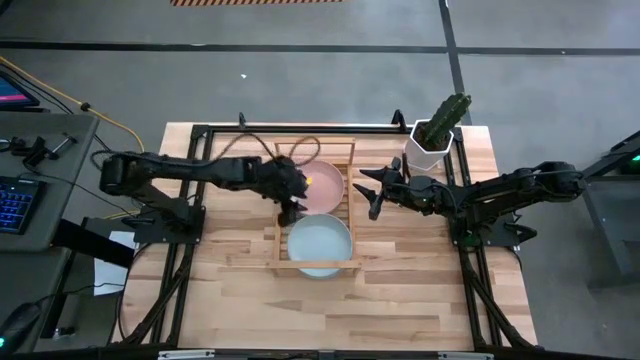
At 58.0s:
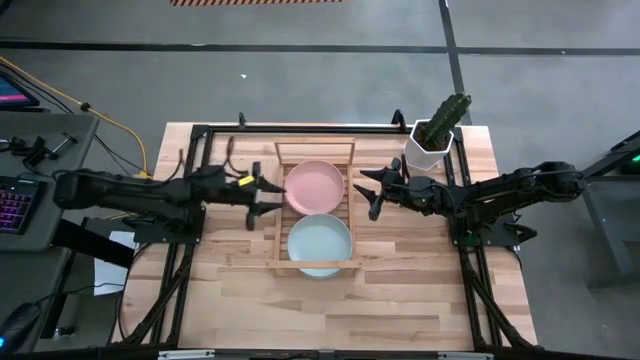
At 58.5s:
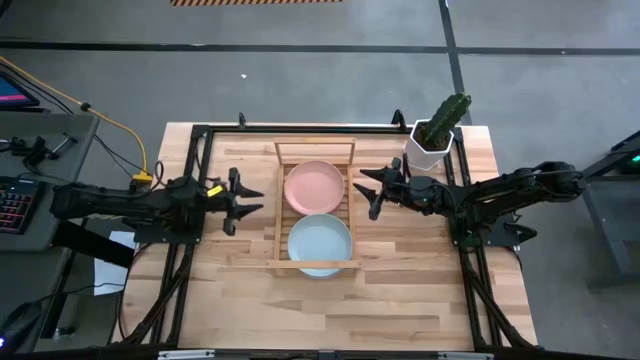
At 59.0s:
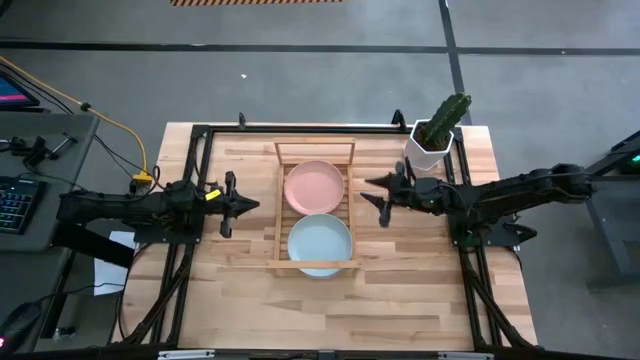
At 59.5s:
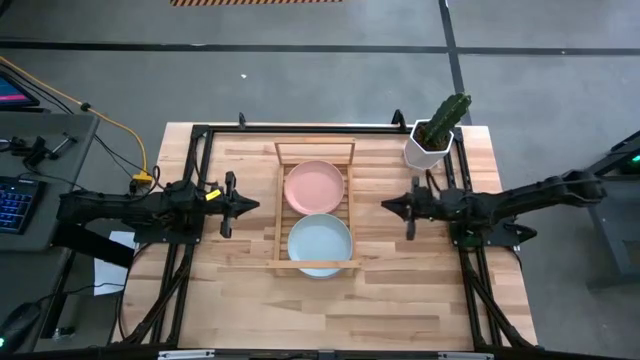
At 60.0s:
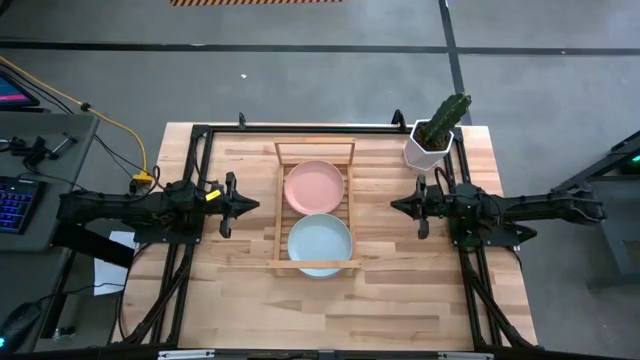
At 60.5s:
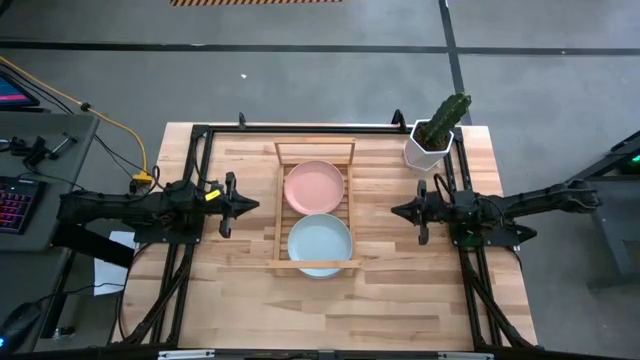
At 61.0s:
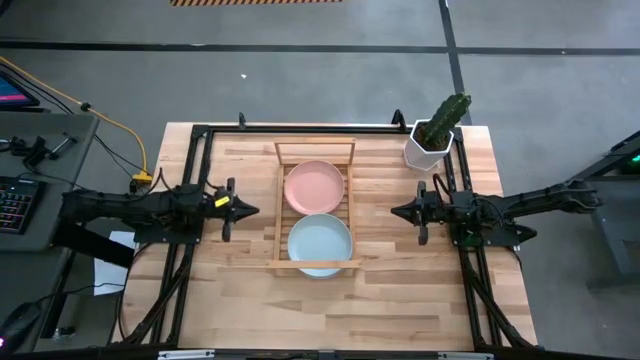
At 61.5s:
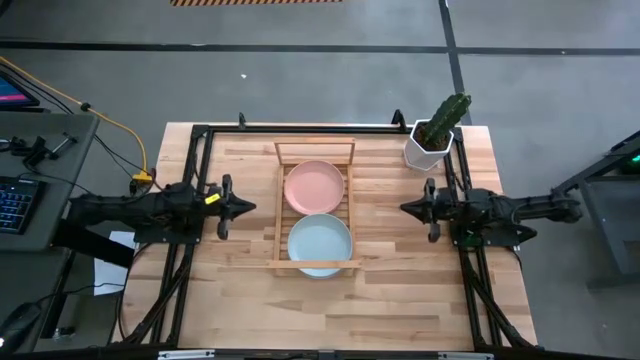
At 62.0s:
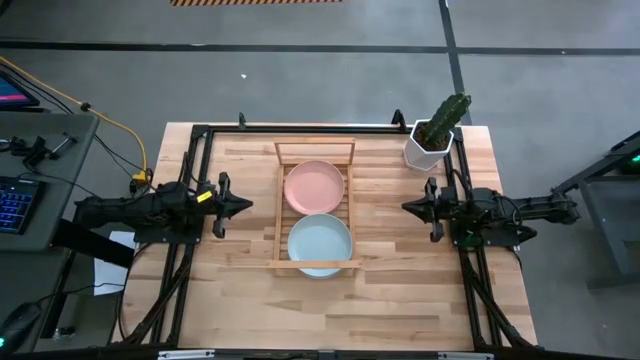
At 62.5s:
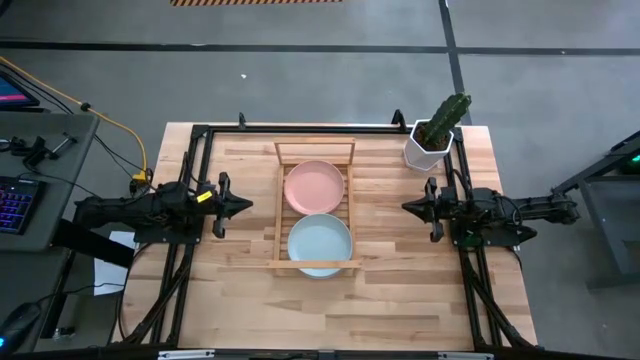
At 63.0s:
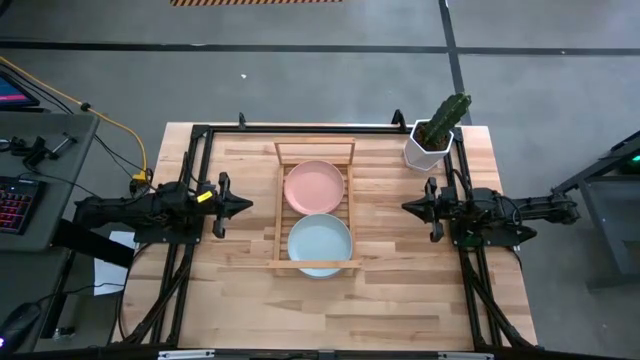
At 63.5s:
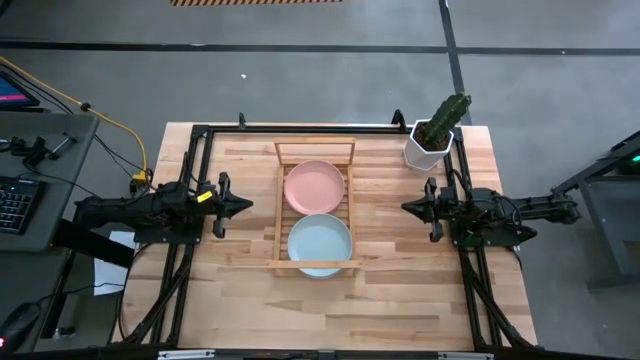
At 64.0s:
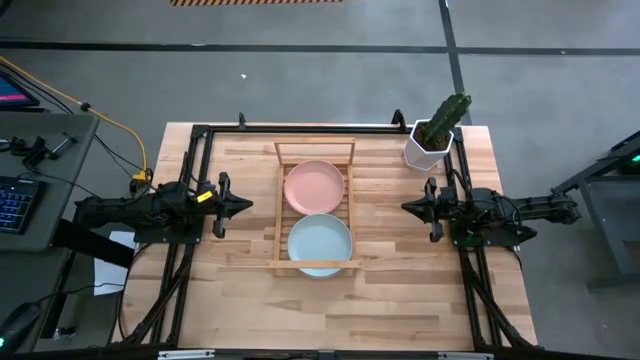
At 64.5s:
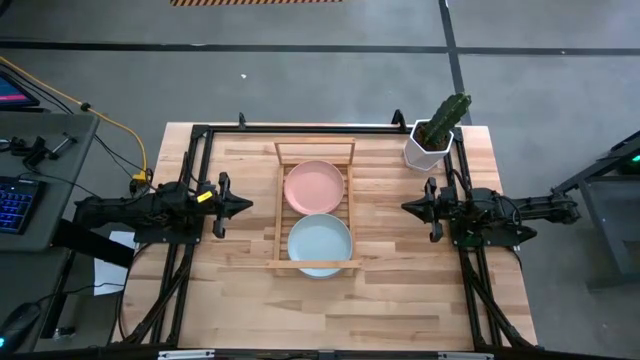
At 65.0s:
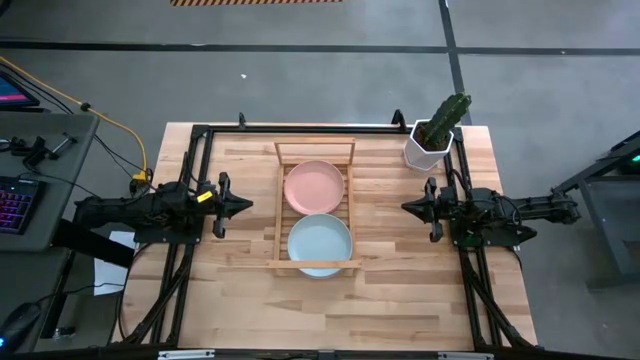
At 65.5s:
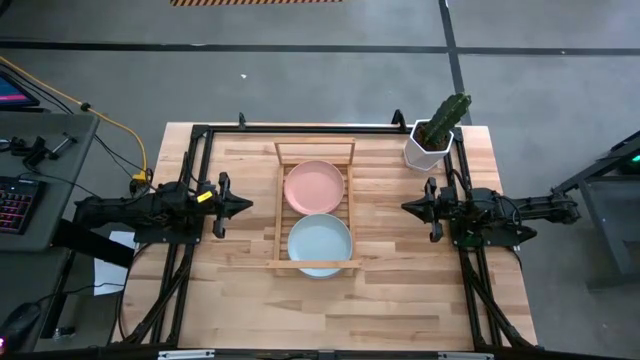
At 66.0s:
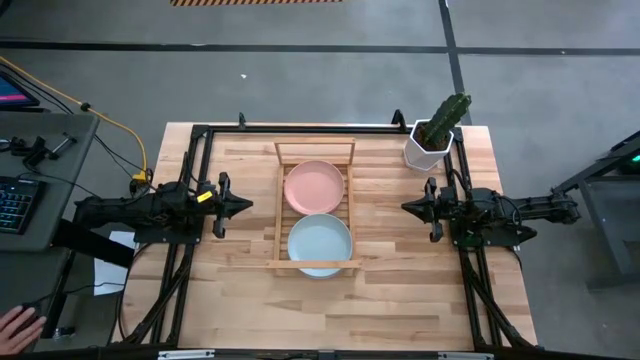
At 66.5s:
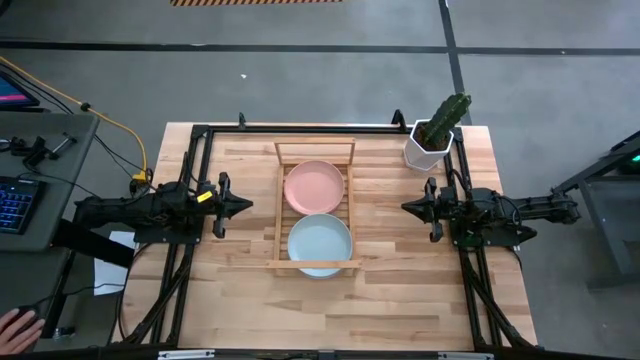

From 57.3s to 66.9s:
Task: Place and stack plates onto a shelf
Return to Home Position

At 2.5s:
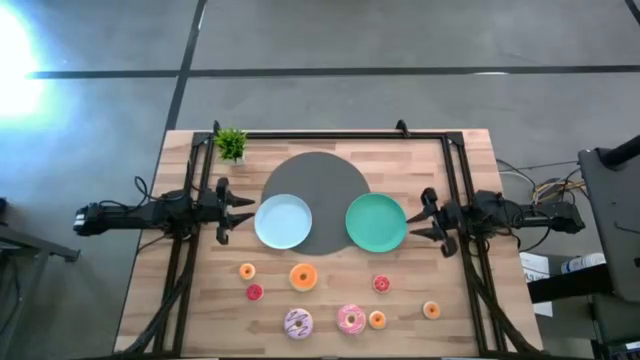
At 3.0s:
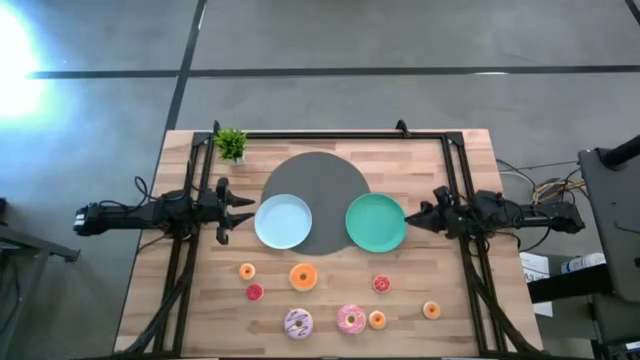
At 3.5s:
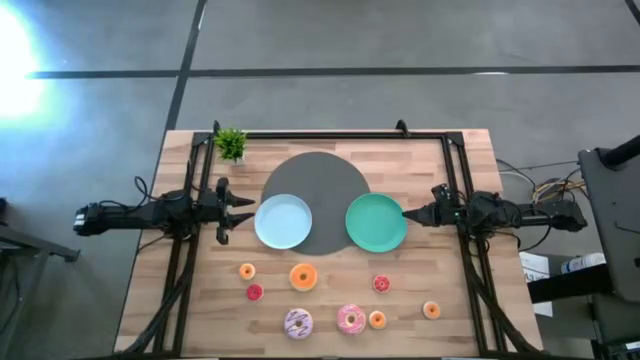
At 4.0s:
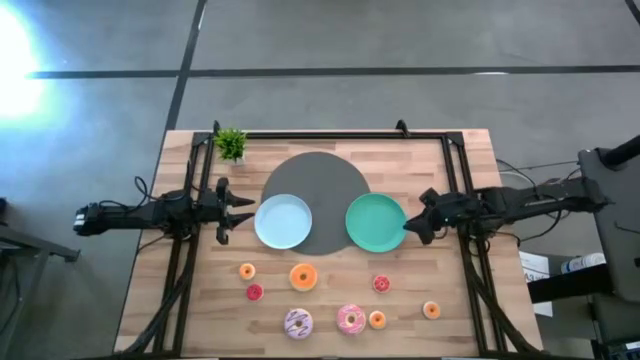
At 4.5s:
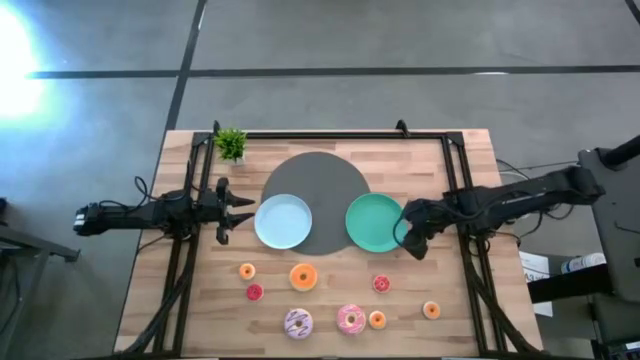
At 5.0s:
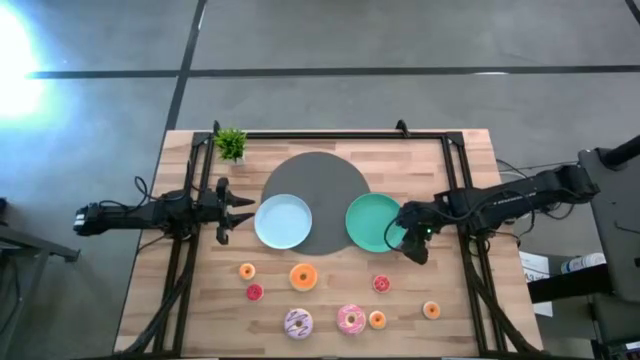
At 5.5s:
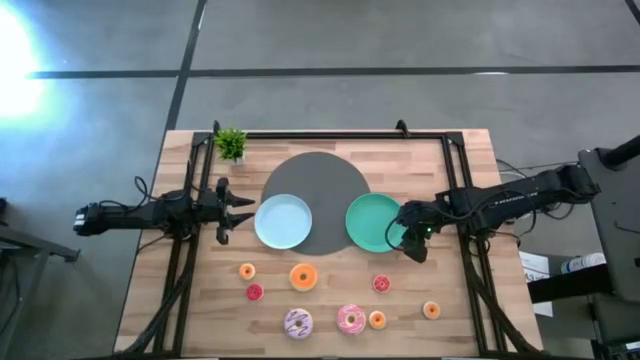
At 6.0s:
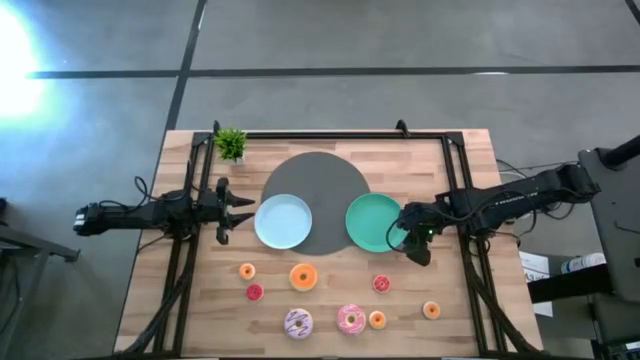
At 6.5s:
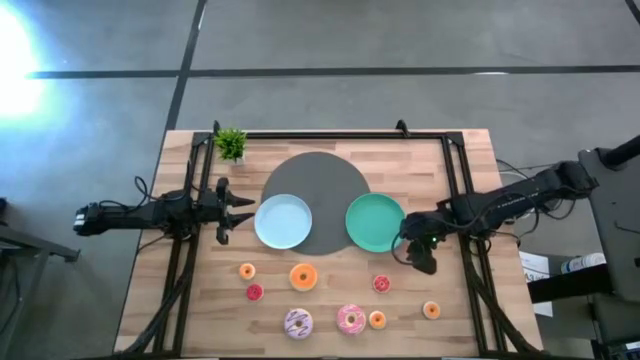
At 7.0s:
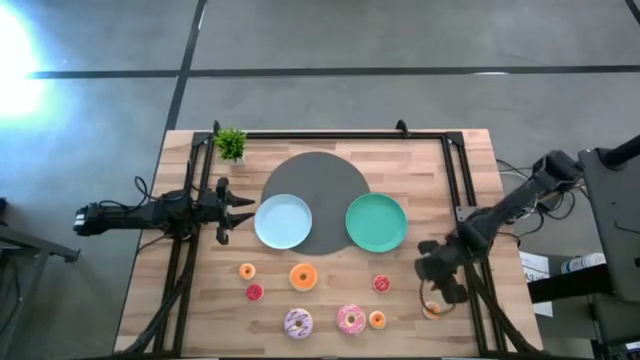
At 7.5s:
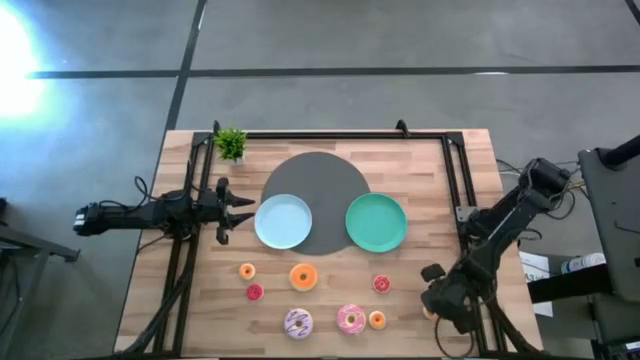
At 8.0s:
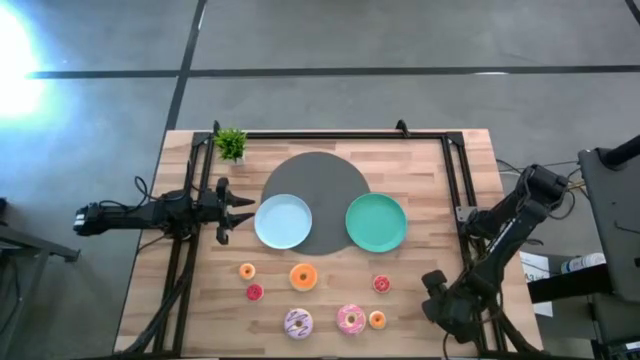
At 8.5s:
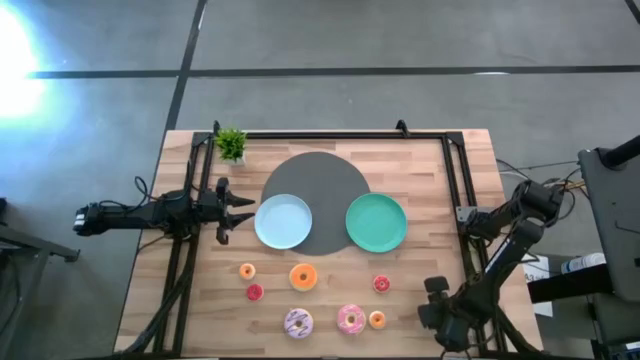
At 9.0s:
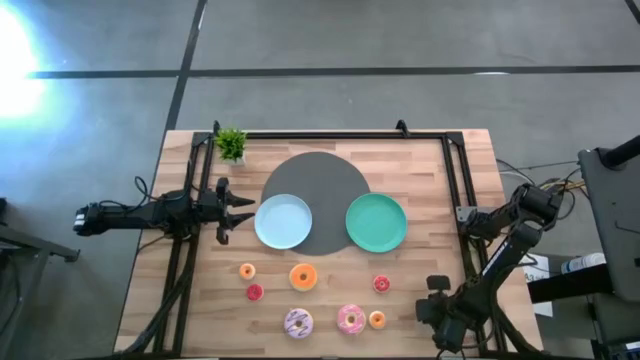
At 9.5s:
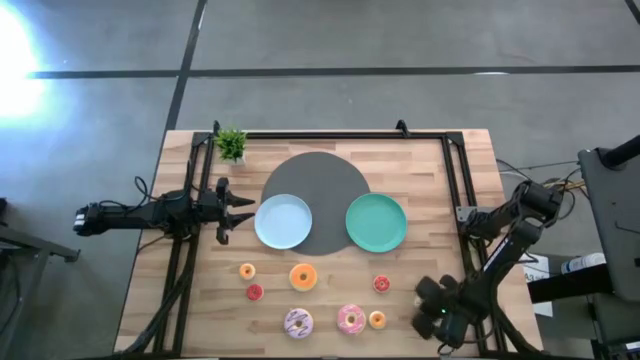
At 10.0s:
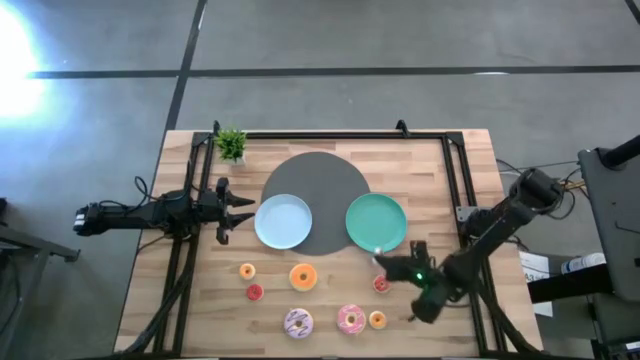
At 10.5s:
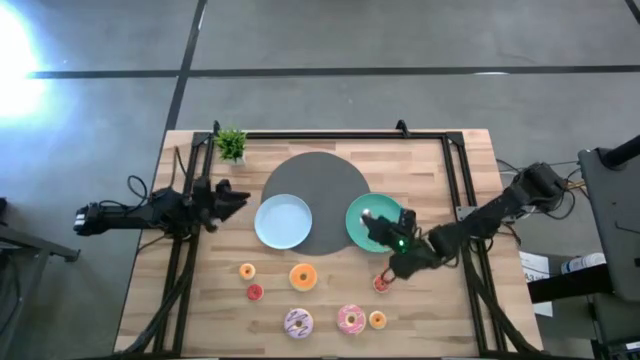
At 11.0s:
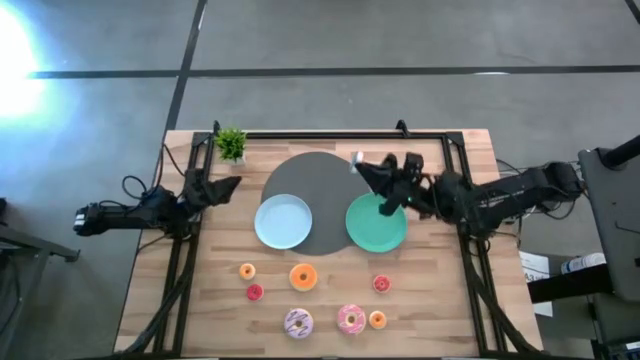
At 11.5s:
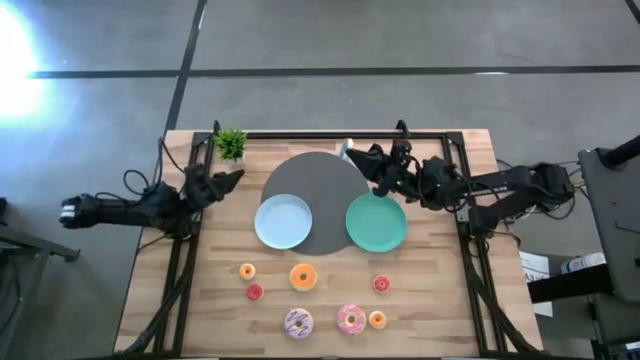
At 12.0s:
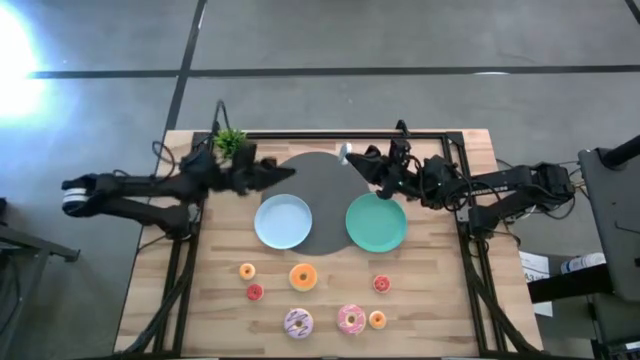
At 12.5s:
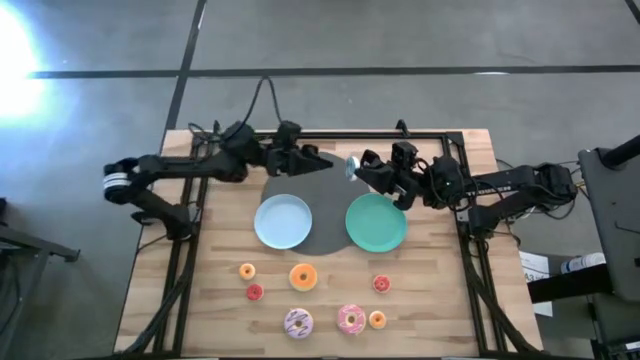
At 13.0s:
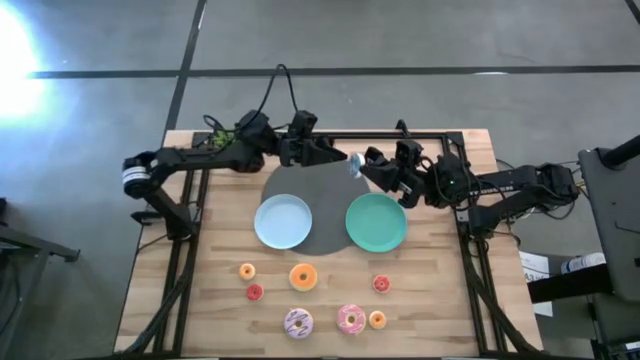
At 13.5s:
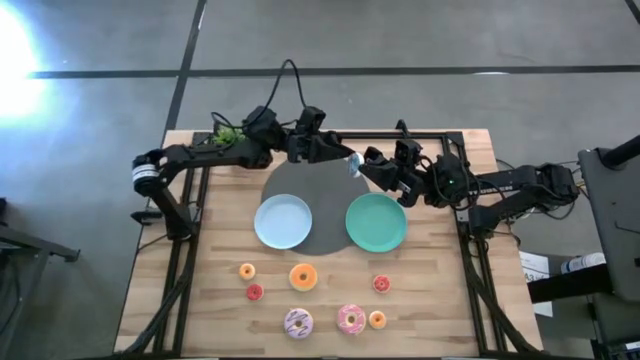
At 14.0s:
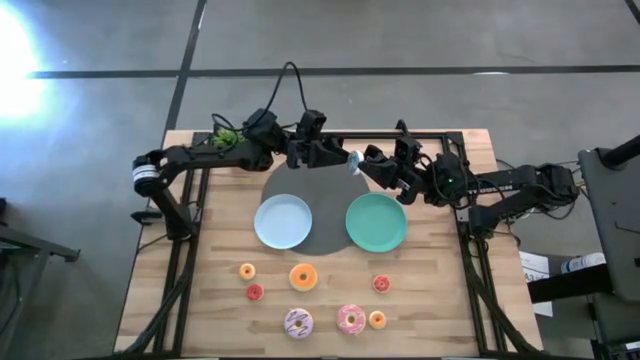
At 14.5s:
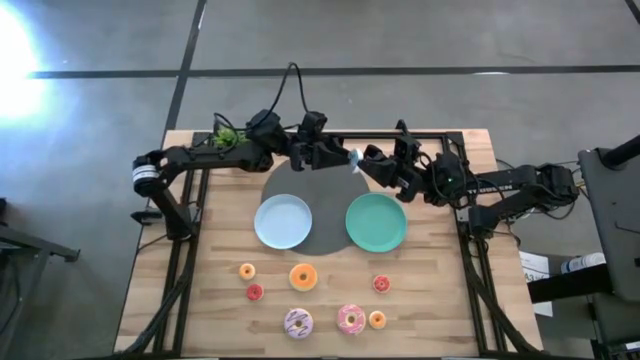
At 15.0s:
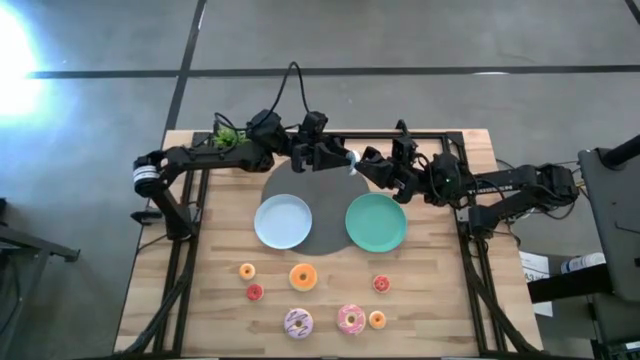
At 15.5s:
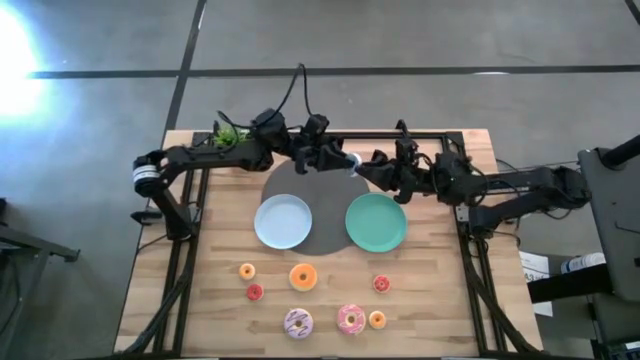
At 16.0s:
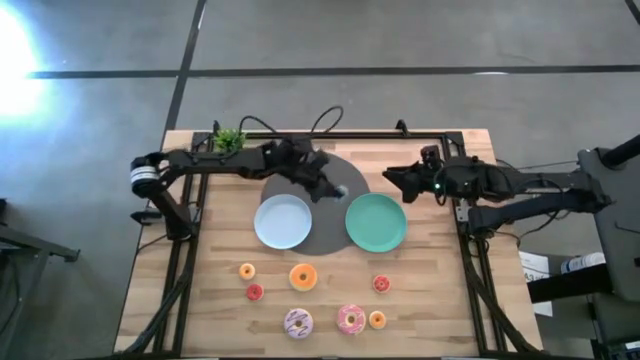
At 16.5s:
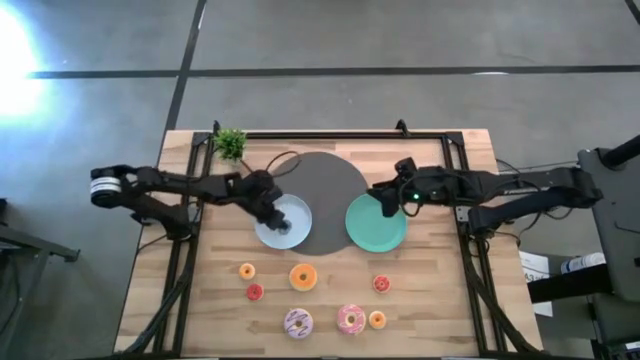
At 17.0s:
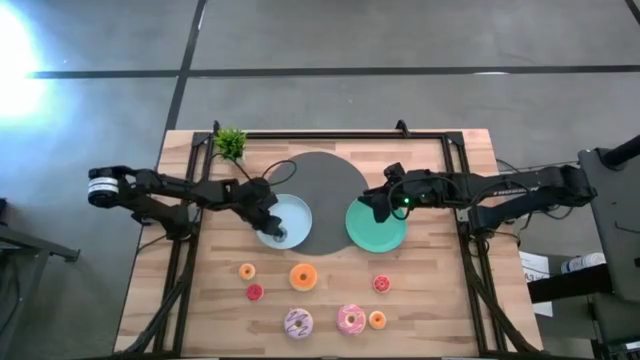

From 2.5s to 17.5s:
Task: Pick & Place donuts
Put the bottom right small orange donut on the light blue plate
